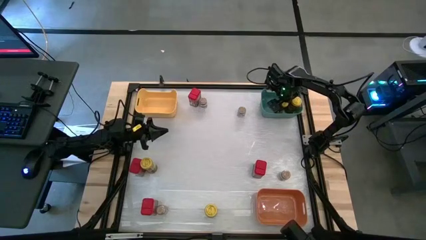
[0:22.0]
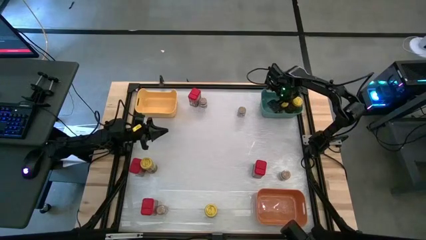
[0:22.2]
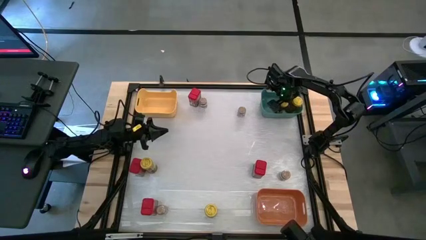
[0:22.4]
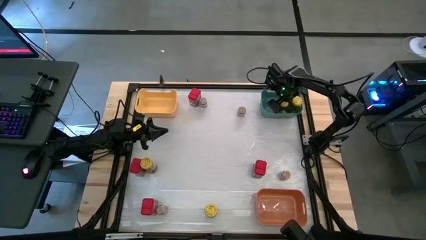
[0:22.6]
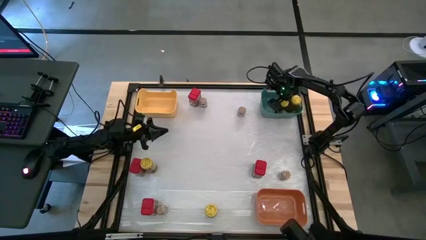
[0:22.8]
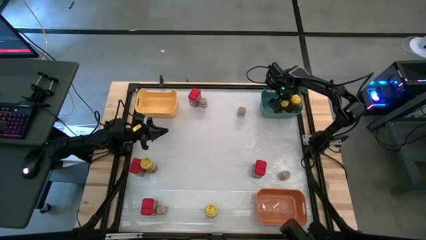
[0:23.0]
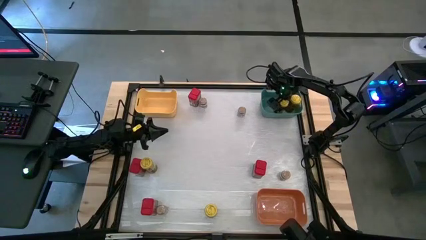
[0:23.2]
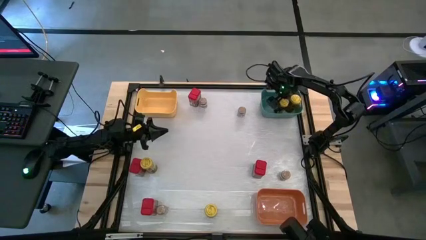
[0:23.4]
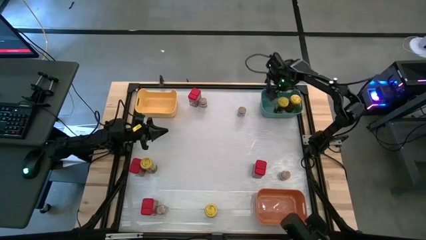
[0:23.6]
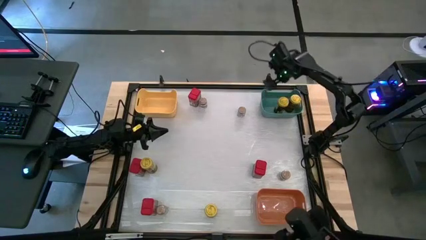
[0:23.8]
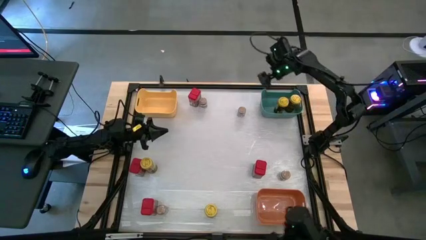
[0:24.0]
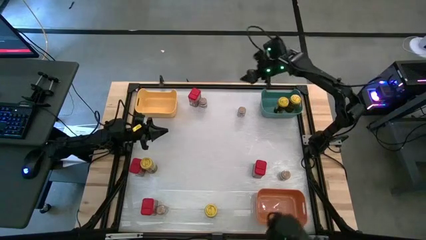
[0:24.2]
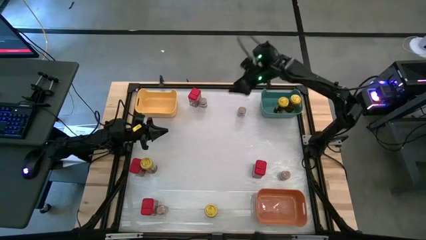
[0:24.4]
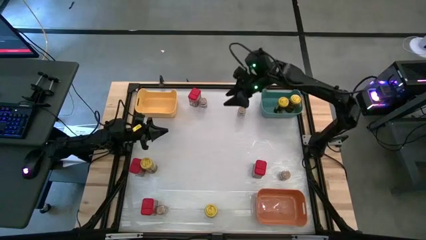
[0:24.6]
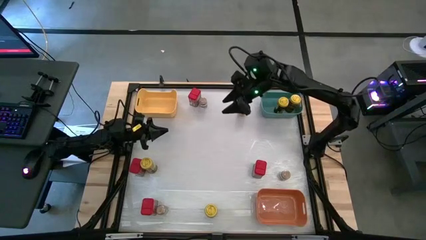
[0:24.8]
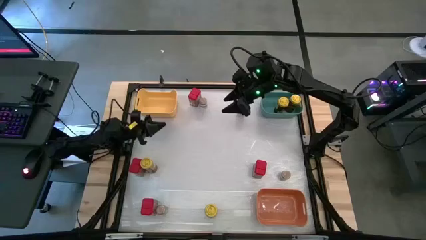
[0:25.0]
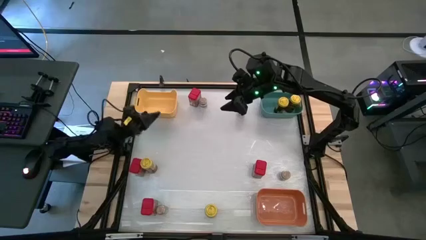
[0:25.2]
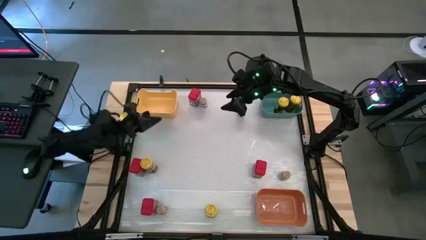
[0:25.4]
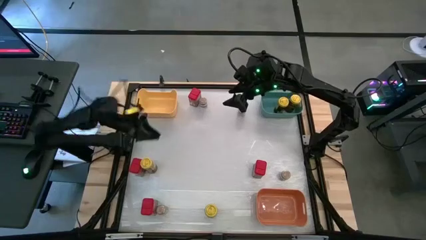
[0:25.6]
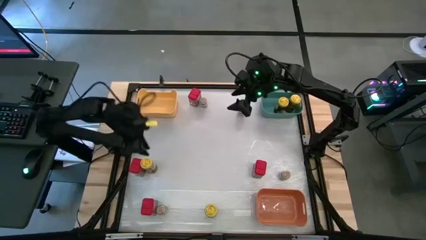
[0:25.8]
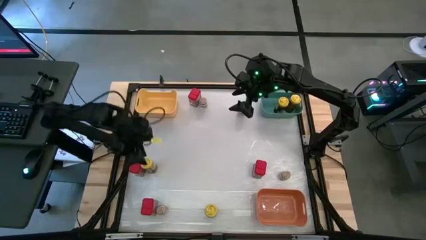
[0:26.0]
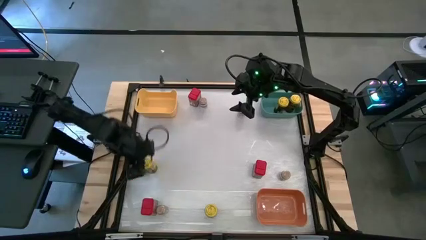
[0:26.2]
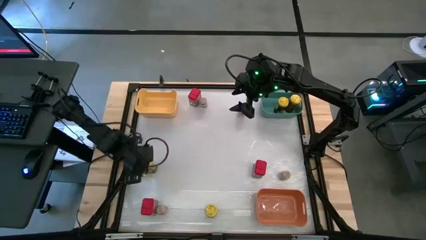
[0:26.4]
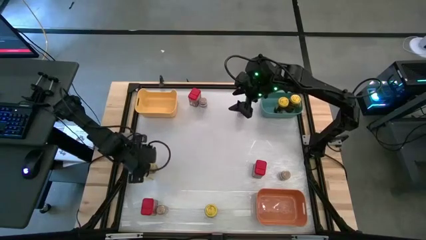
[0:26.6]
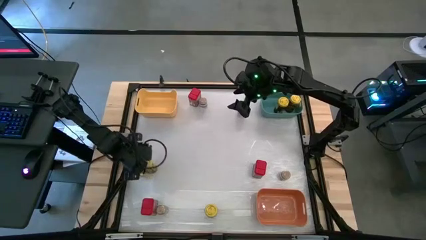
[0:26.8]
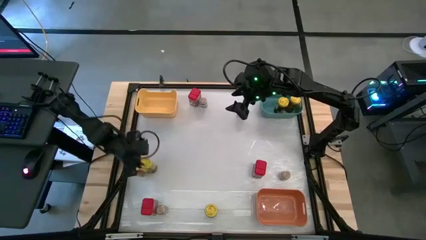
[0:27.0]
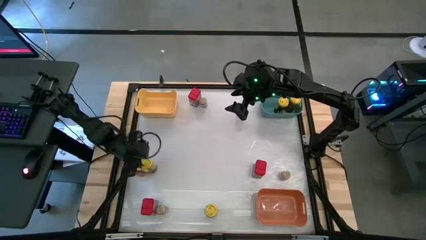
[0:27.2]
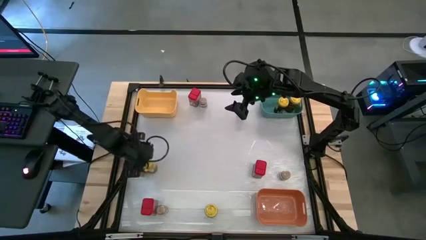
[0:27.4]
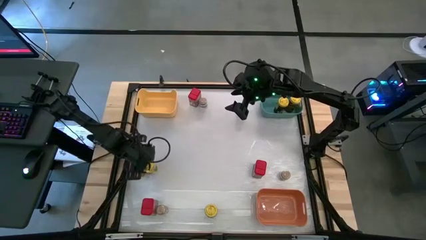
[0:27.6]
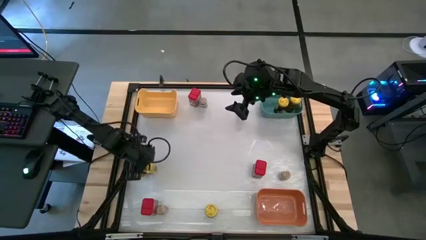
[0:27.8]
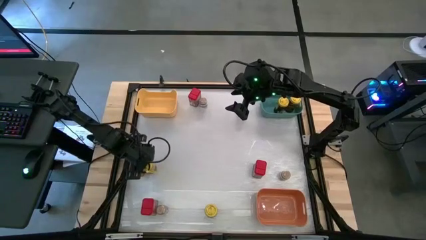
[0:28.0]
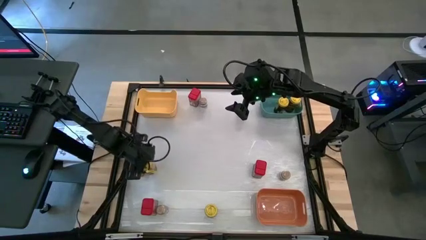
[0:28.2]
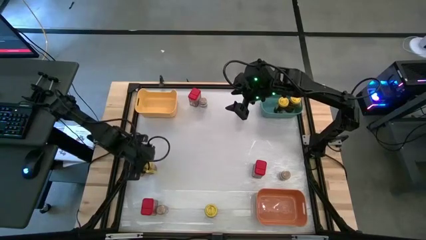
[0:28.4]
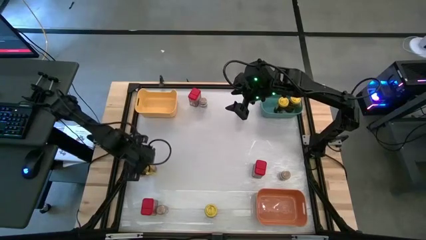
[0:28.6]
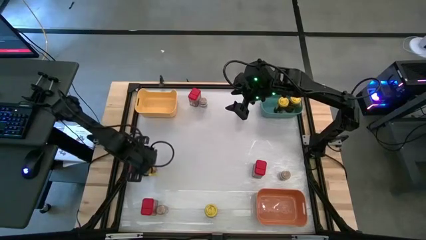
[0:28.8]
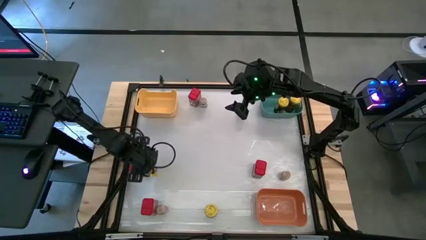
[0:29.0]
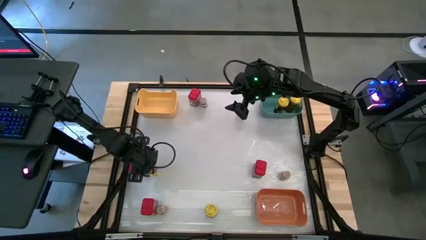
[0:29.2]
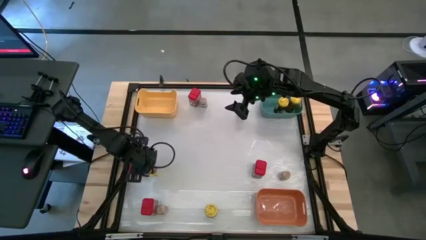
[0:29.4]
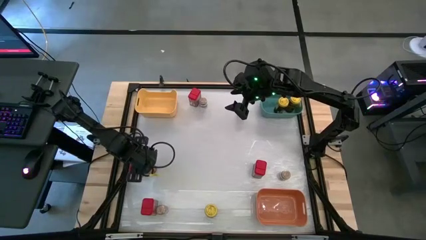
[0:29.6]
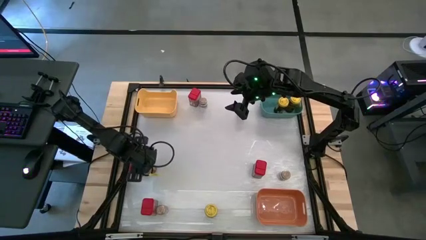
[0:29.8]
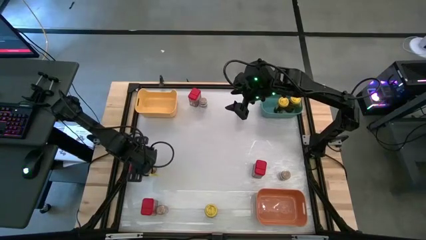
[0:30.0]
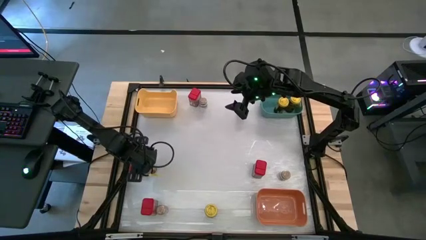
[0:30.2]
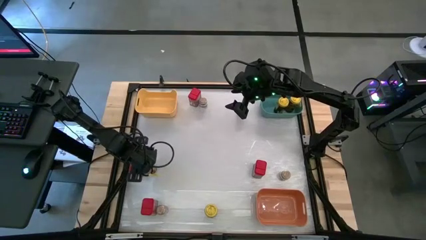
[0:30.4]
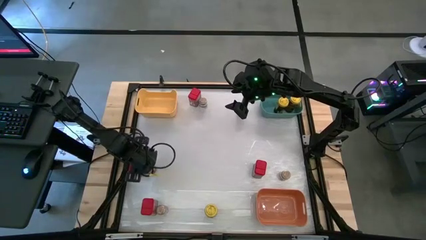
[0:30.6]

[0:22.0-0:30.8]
Task: Sort spices by type
Put the left yellow seasoning bottle into the green bin

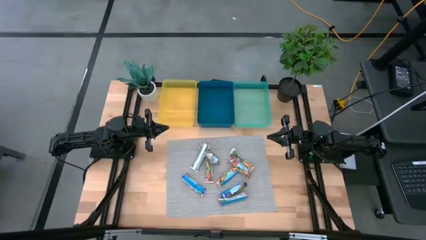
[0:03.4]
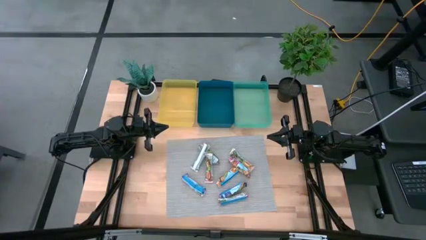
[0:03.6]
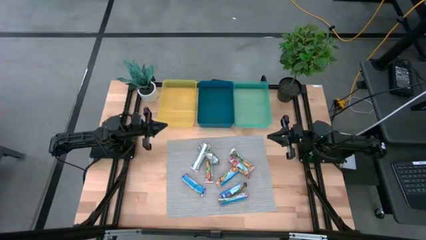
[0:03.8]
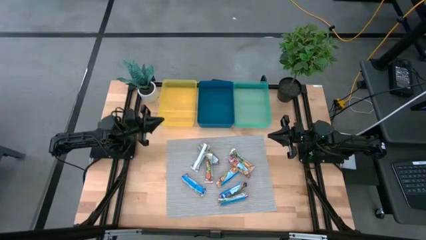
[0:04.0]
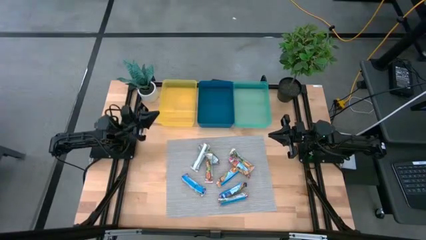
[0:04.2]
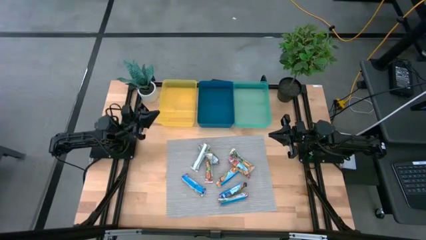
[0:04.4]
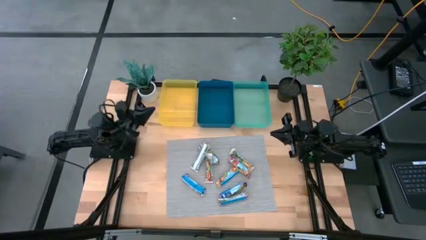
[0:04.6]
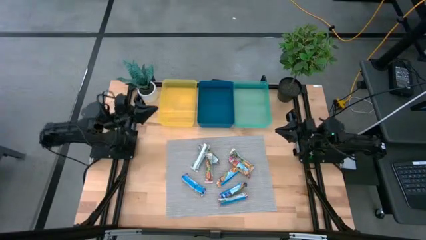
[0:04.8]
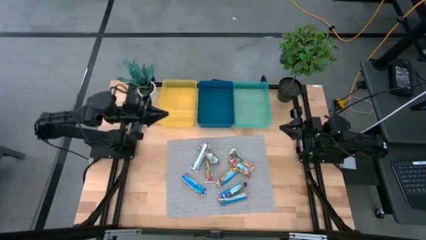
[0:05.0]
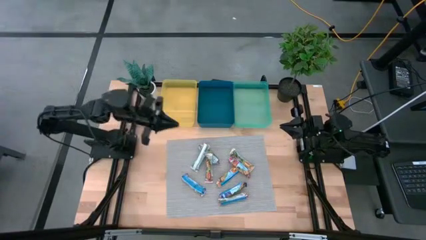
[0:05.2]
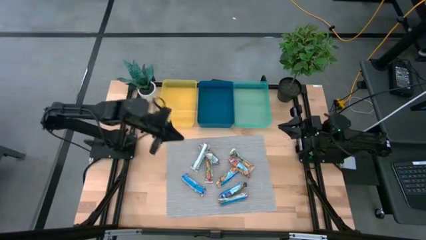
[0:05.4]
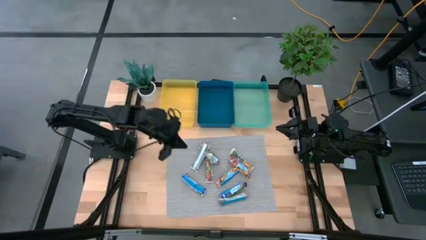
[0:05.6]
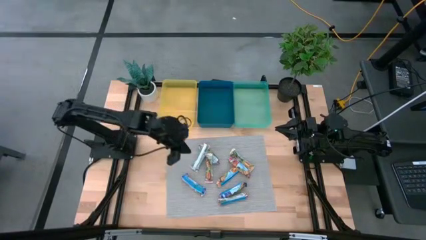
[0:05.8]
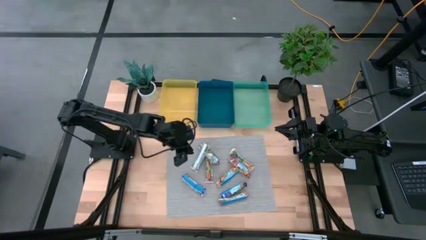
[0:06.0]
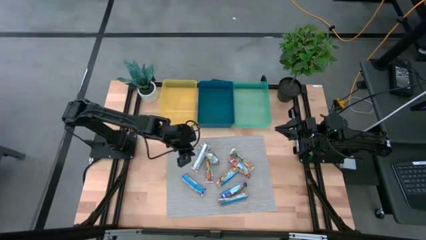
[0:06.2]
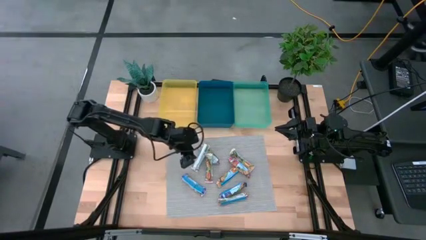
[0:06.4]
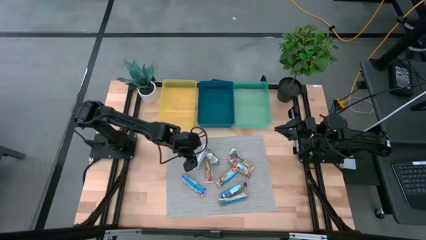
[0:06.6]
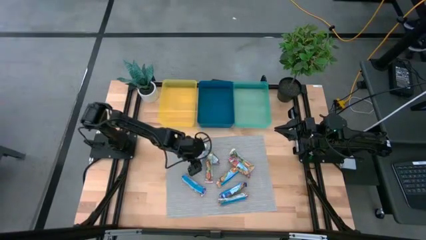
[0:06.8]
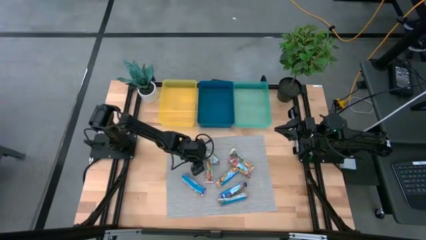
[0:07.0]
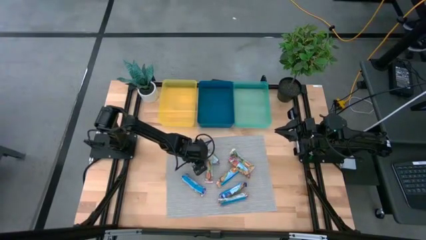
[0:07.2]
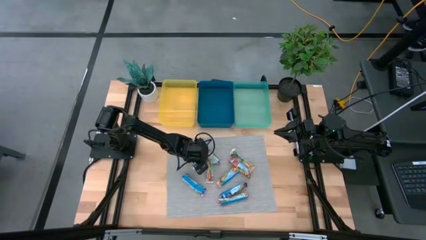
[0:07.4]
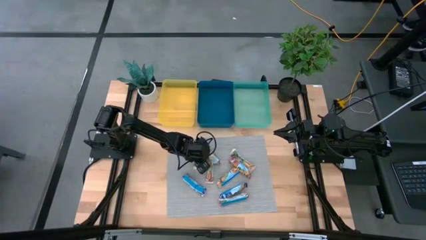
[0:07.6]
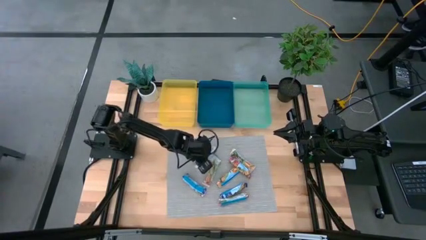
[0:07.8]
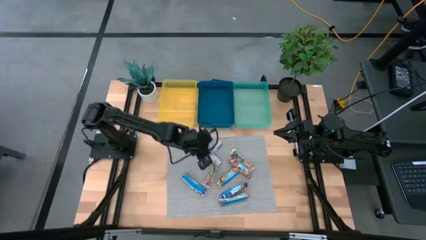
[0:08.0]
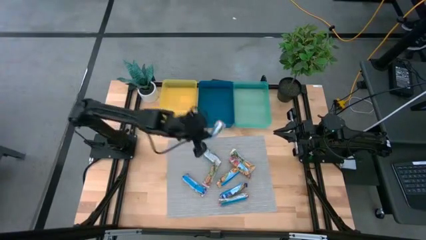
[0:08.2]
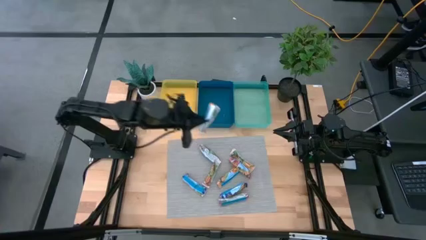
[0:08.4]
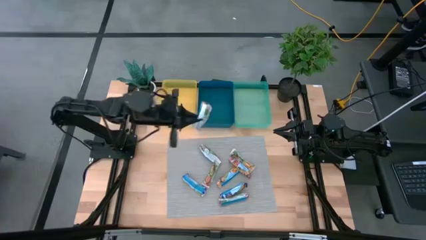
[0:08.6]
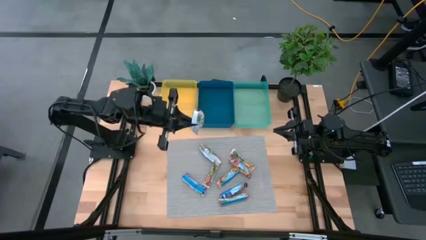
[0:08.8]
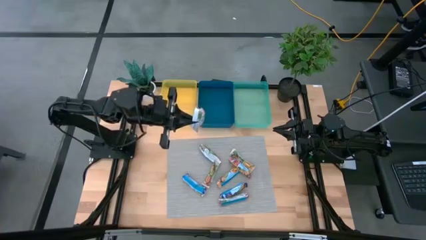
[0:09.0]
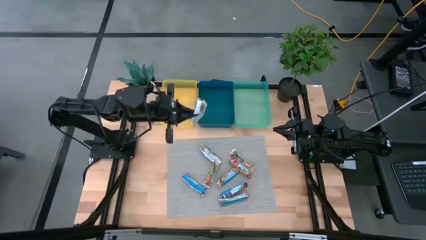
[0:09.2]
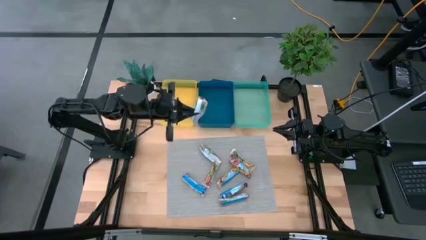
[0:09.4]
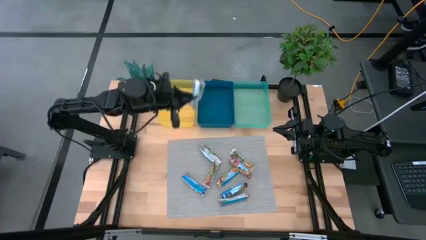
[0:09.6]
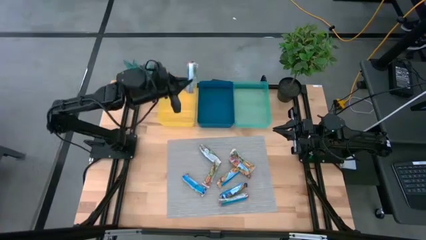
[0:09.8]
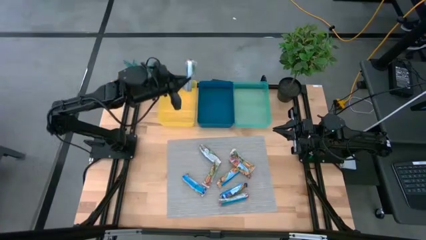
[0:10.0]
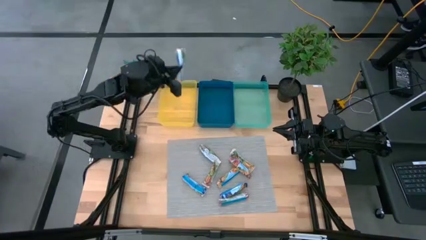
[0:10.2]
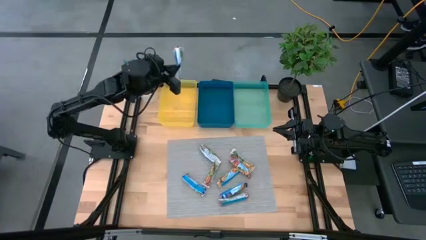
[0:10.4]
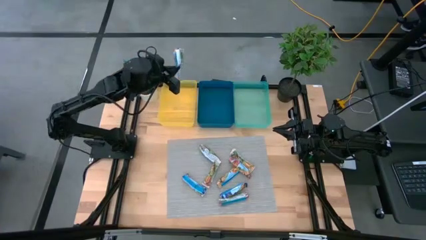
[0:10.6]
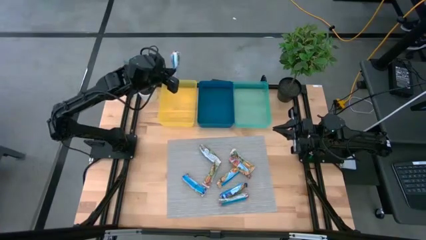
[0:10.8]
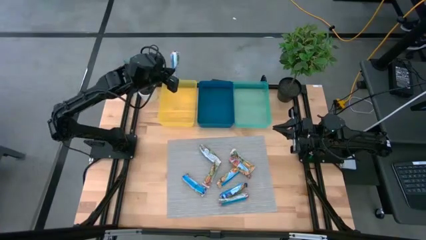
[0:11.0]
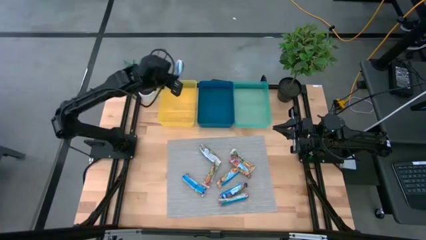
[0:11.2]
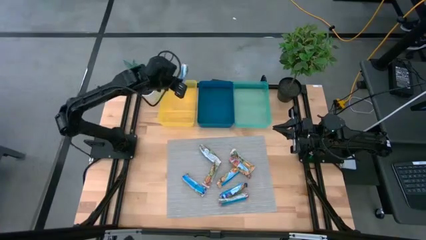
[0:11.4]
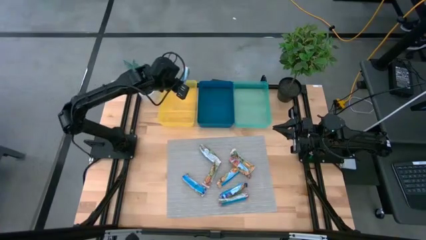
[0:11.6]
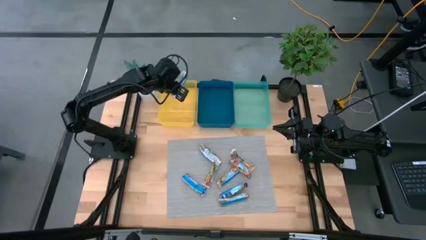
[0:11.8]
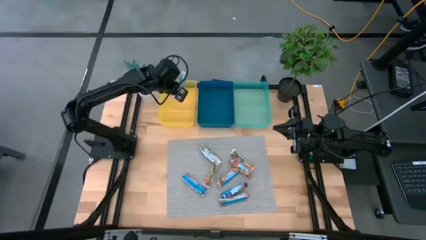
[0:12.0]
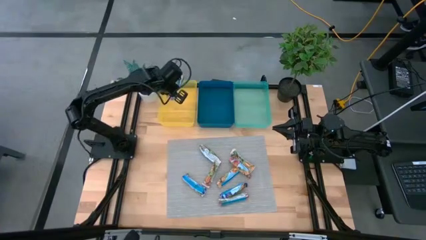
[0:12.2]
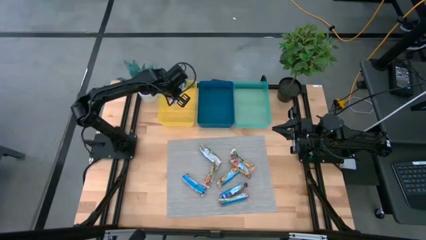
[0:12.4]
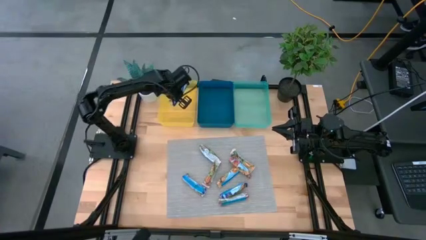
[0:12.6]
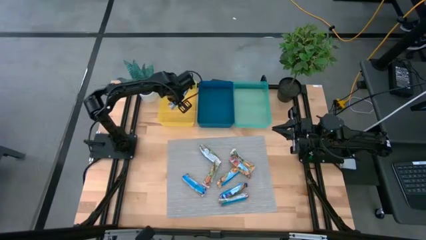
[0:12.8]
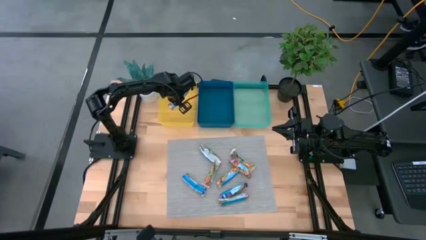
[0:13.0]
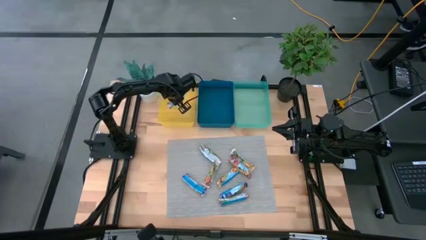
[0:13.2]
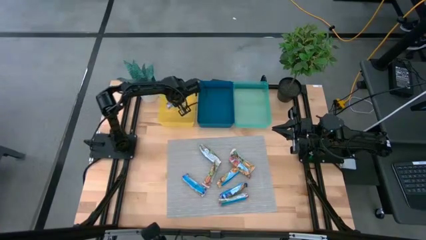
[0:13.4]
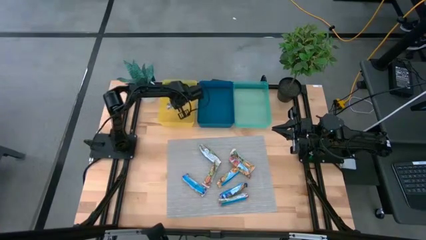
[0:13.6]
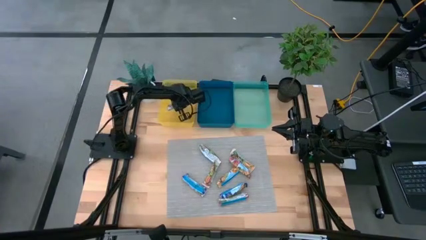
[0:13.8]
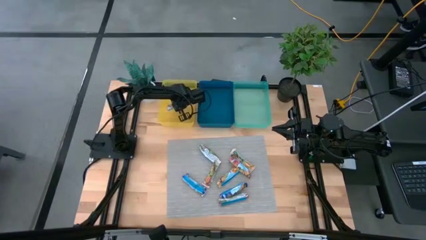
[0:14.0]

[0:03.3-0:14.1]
Task: Pick and place Granola Bars by type
Put the yellow granola bar into the yellow bin
